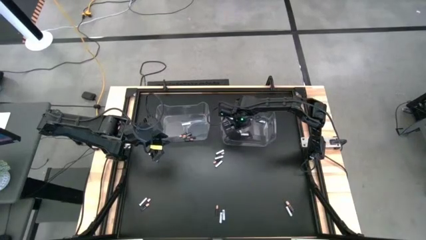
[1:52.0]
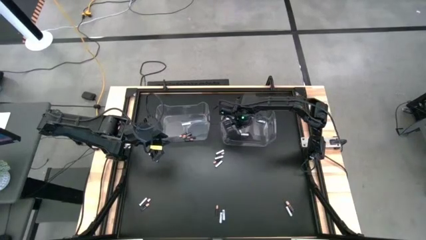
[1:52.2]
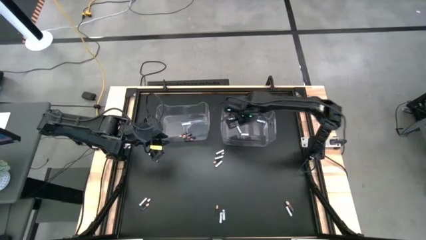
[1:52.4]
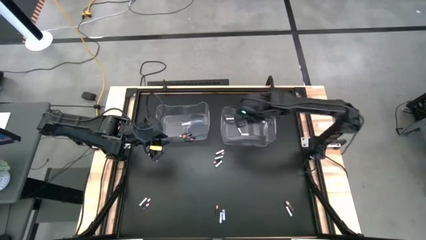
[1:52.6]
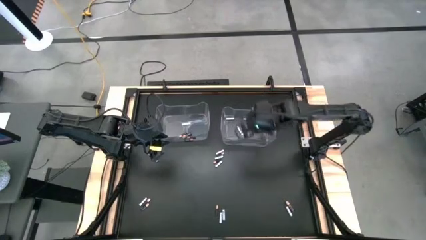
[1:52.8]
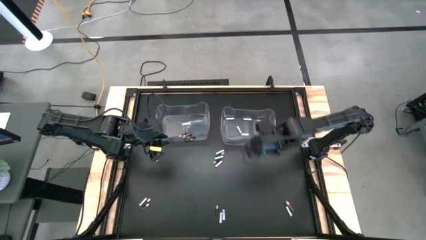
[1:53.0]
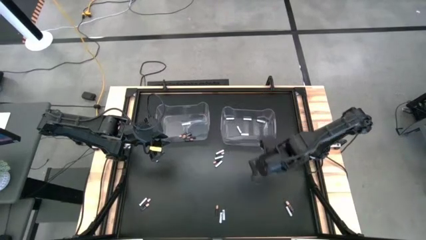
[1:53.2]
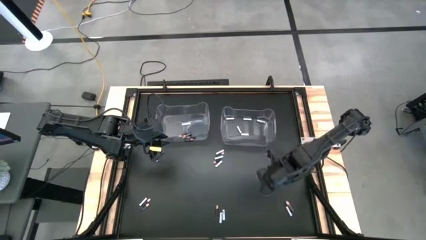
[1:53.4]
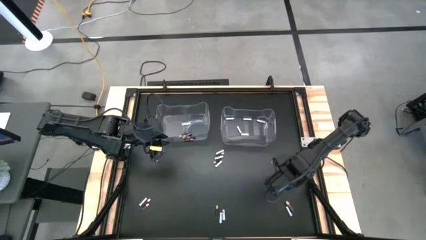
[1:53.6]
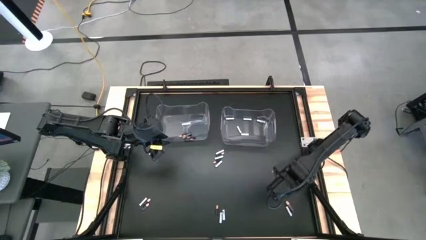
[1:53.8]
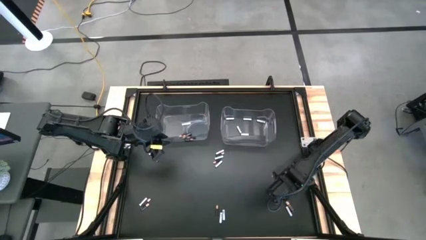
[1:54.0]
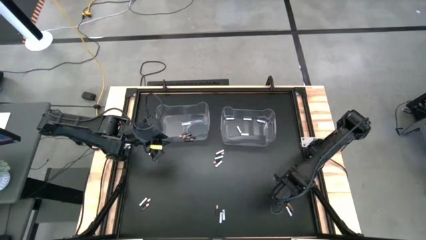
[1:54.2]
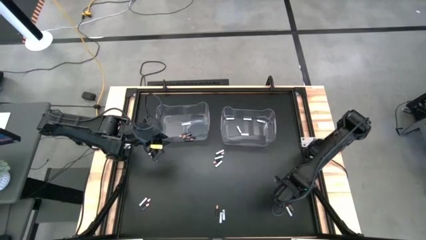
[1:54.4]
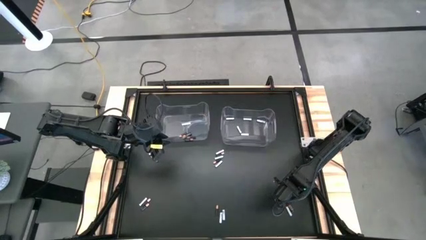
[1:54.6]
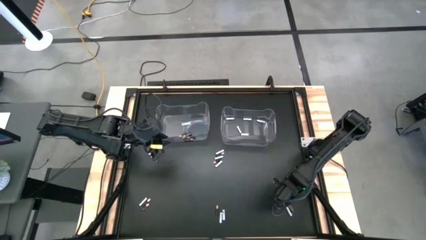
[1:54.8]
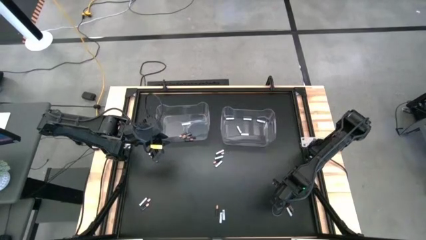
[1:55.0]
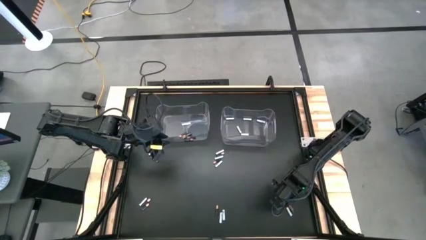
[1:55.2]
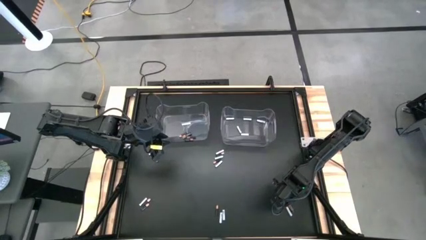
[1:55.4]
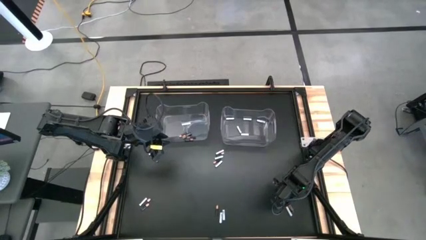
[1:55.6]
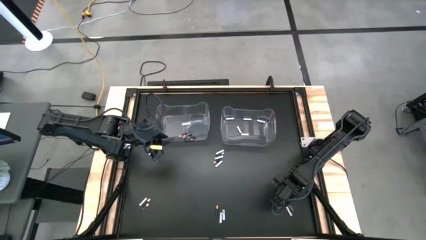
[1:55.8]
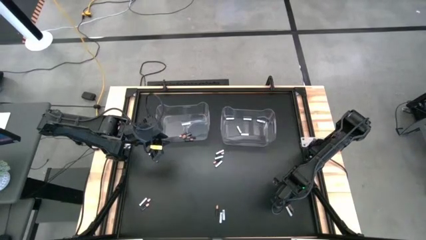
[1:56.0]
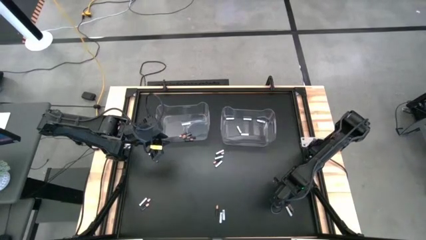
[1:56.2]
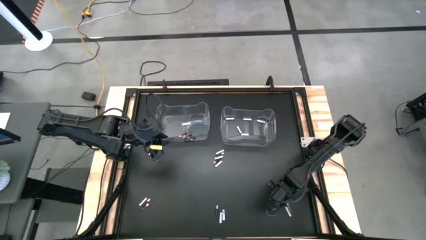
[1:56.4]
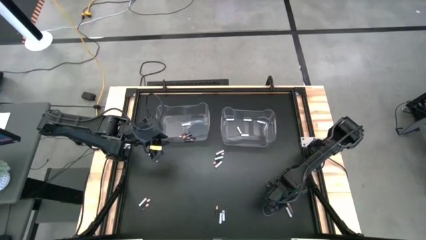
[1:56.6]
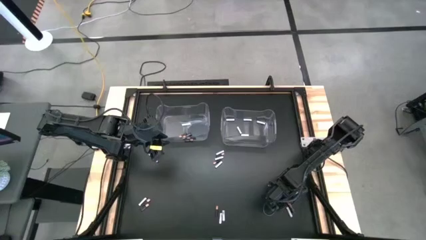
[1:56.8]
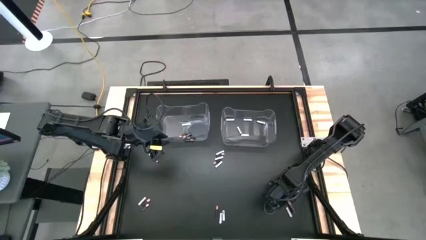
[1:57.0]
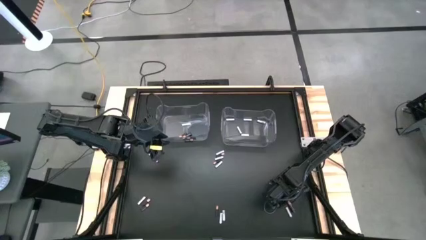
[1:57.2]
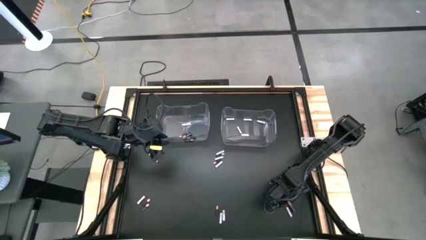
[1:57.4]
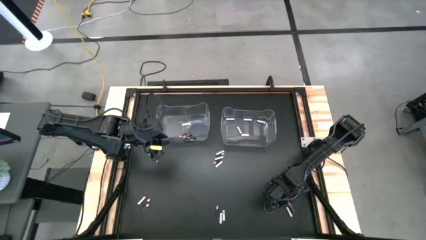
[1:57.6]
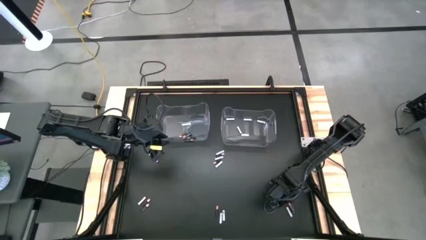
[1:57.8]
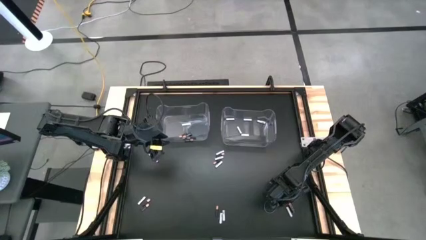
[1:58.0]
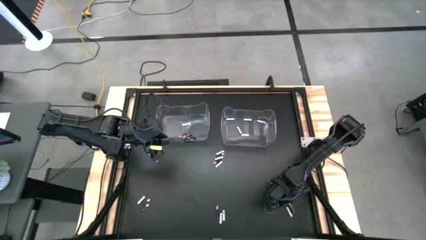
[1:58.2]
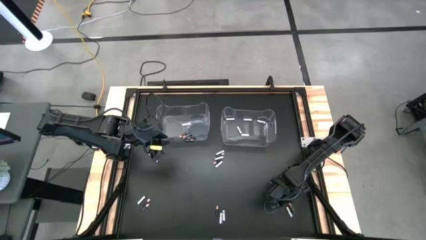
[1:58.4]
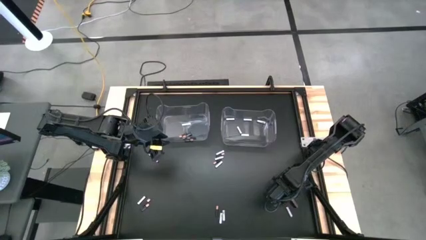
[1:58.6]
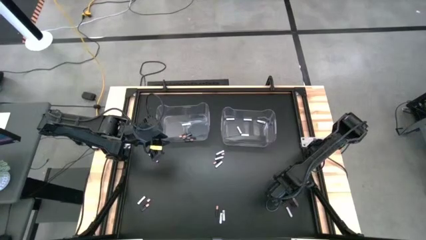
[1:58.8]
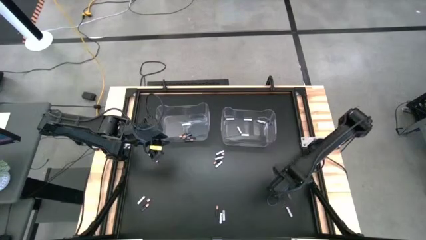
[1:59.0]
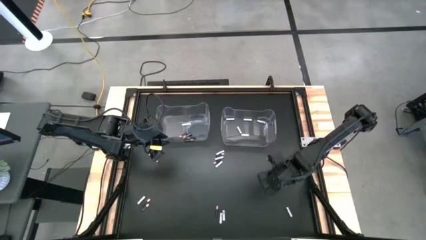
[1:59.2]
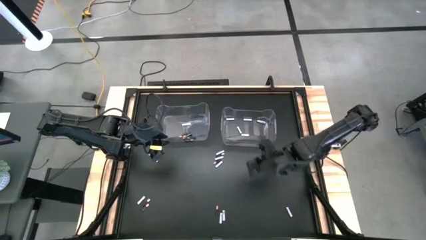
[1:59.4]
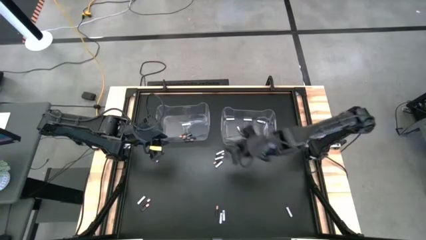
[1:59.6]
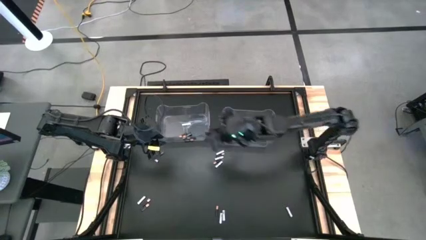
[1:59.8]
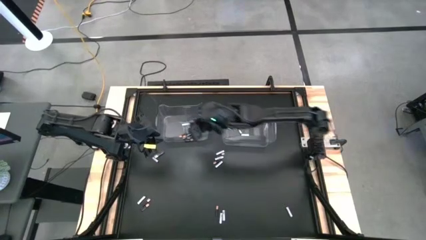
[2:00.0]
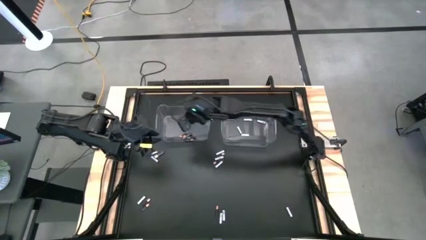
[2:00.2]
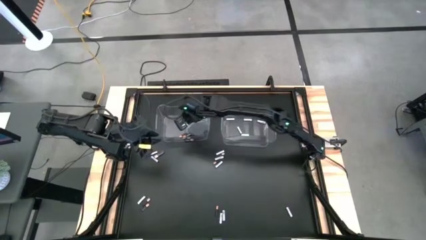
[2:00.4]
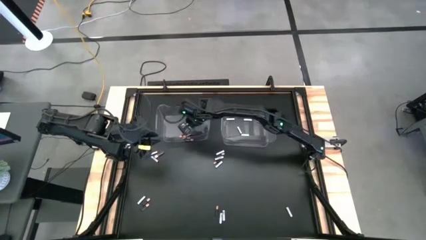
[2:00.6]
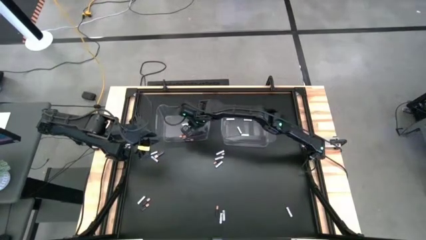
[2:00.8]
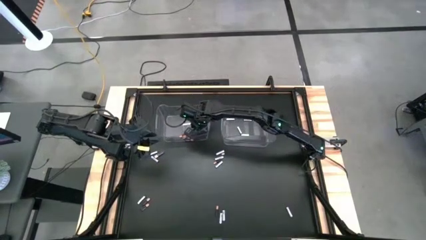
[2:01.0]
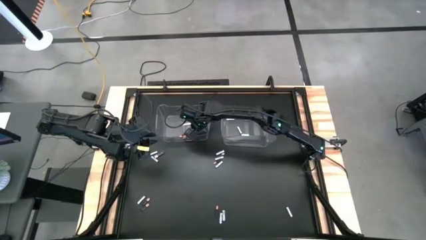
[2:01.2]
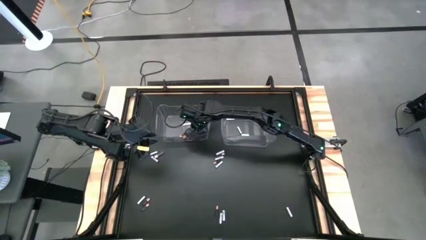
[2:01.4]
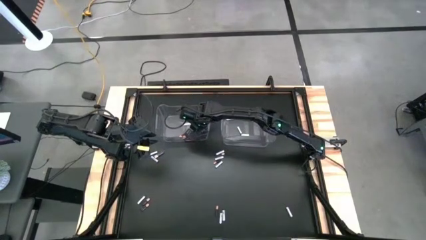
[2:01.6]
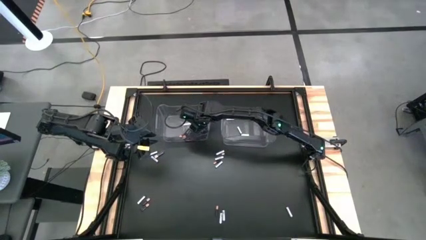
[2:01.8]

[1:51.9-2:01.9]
Task: Sort batteries
Put the black battery into the left transparent bin

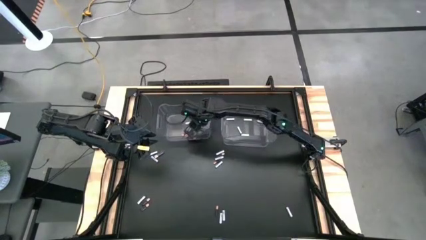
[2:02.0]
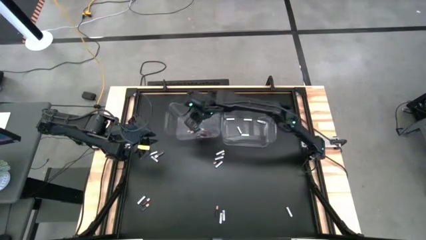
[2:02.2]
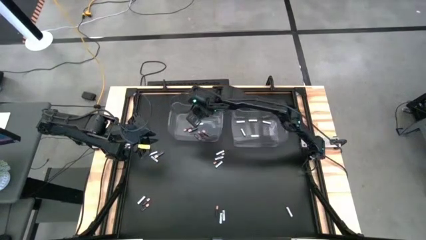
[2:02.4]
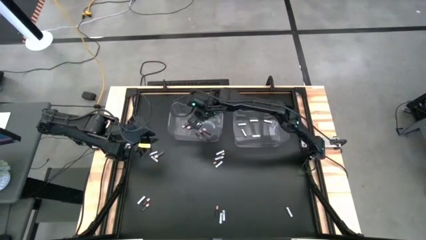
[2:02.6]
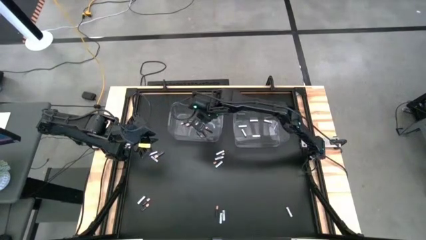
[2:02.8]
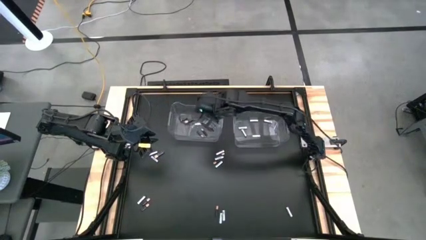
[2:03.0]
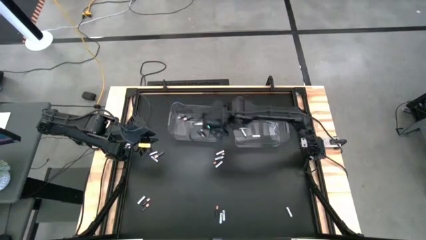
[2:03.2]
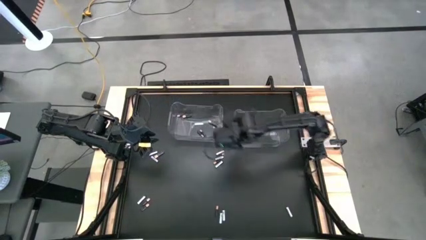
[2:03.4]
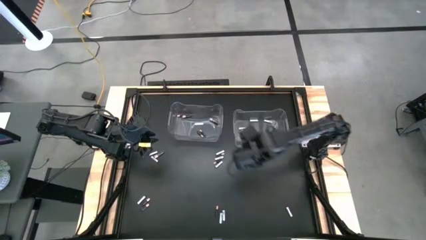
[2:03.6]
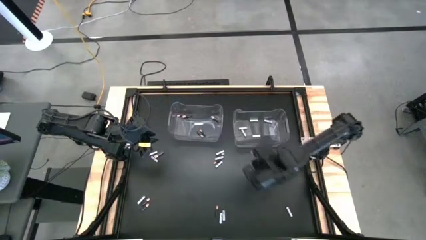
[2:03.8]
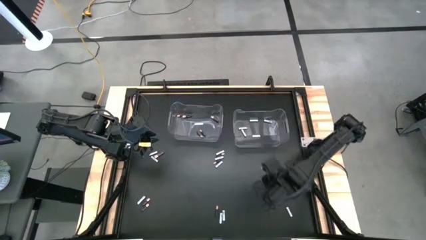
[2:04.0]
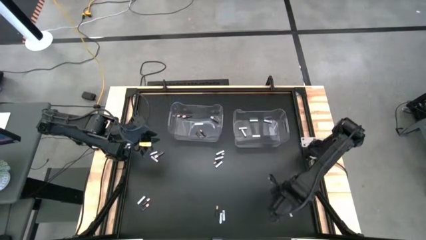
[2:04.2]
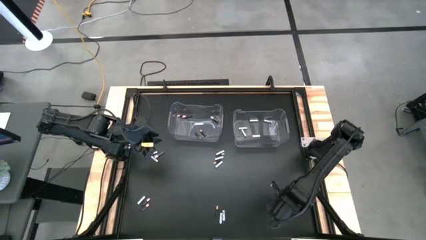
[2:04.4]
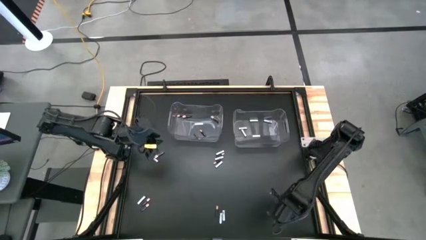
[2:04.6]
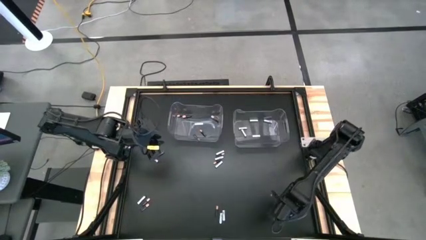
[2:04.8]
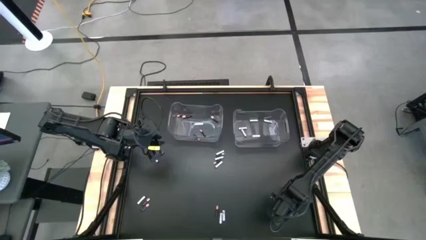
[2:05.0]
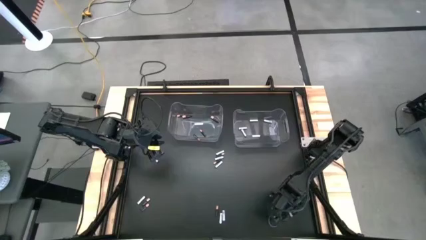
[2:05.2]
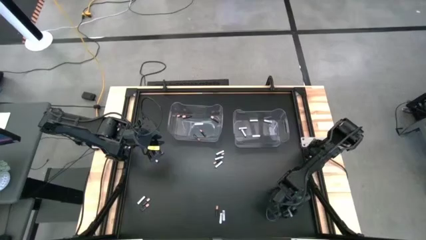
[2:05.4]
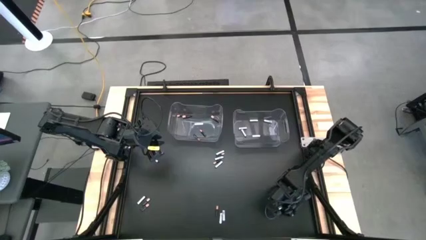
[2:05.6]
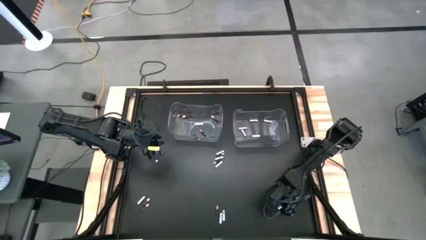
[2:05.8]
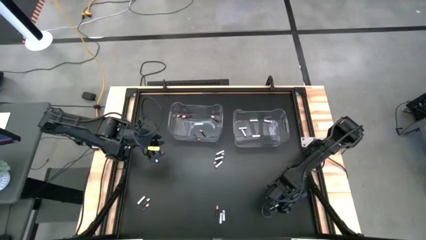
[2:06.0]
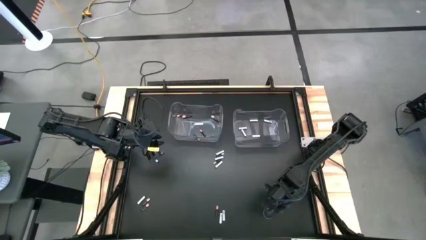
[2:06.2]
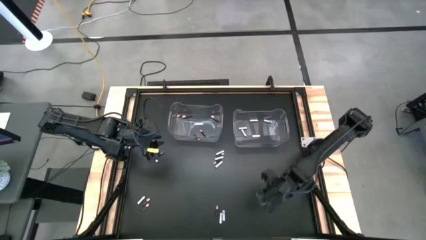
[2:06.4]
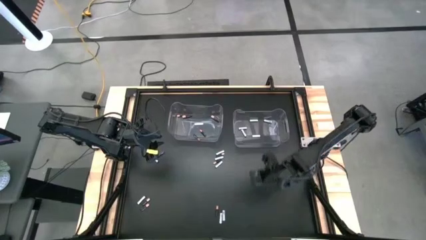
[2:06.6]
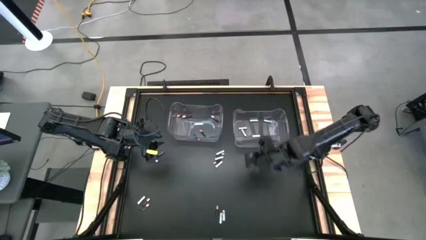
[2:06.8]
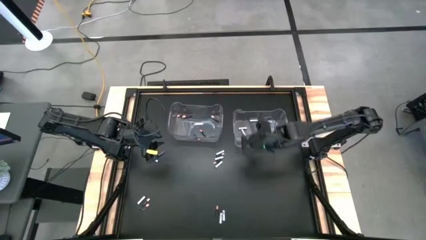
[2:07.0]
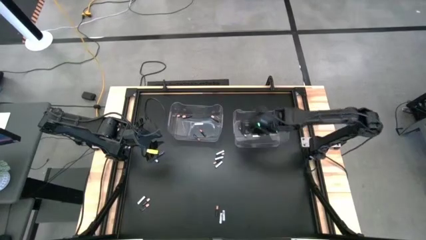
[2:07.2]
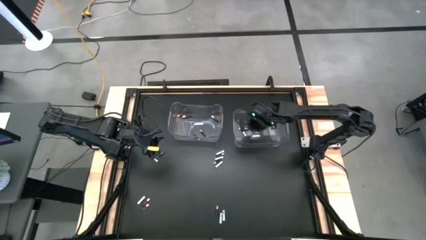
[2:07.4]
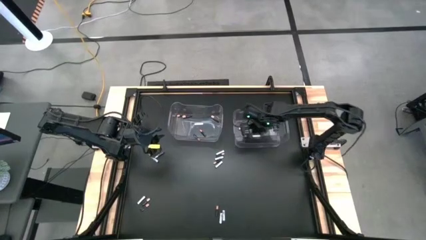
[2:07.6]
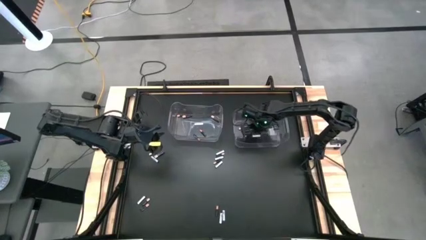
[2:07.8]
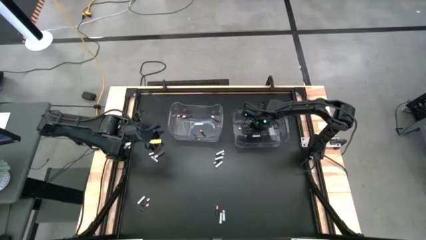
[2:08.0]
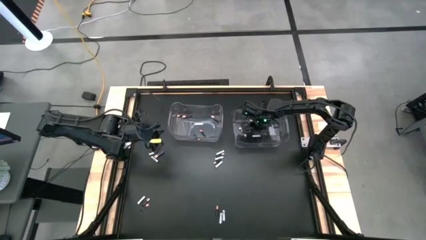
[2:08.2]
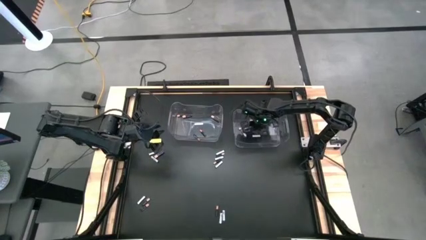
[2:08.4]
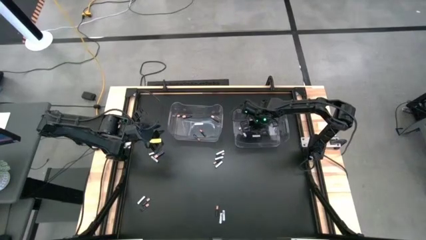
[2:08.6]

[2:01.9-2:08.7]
Put the white battery into the right transparent bin
